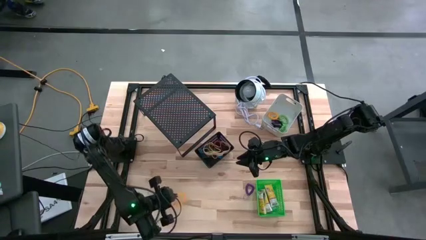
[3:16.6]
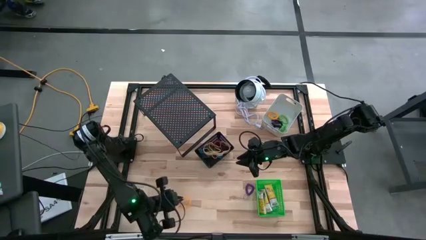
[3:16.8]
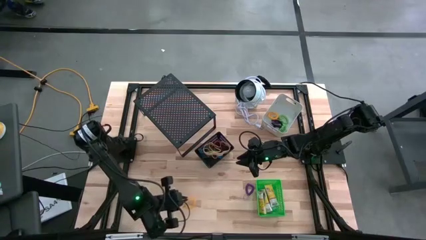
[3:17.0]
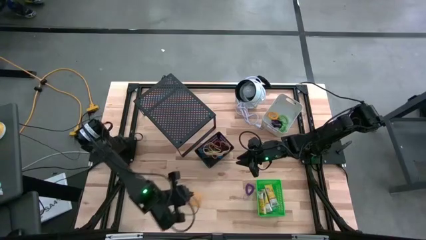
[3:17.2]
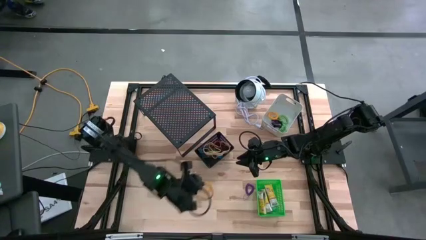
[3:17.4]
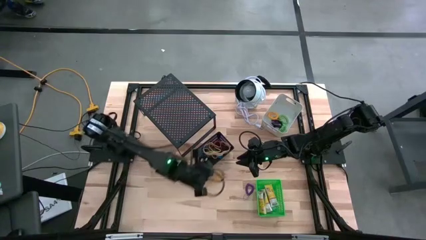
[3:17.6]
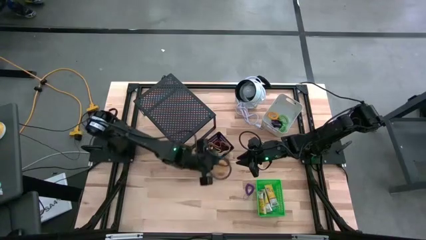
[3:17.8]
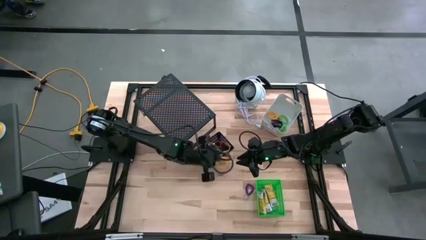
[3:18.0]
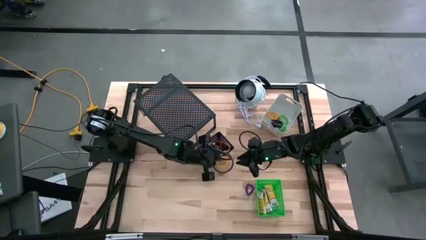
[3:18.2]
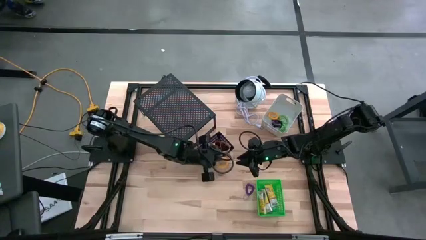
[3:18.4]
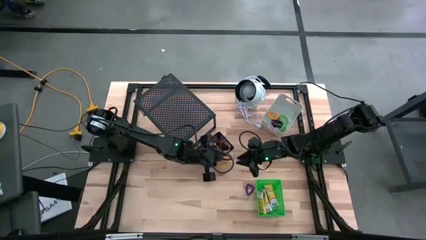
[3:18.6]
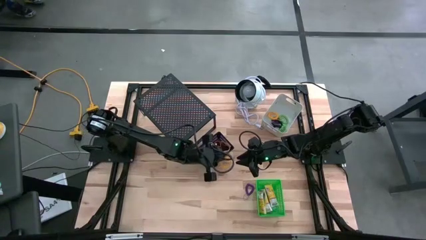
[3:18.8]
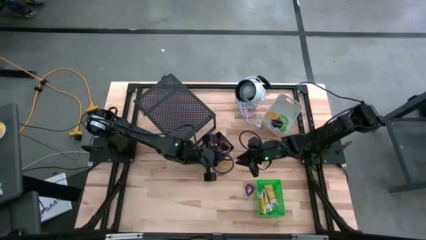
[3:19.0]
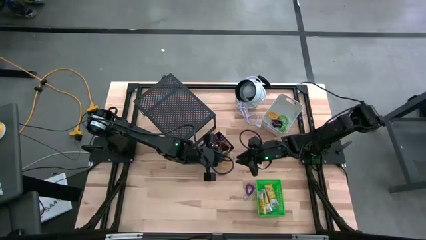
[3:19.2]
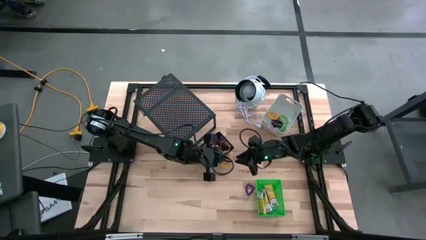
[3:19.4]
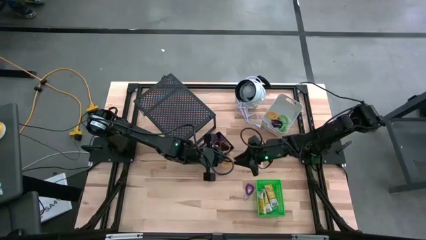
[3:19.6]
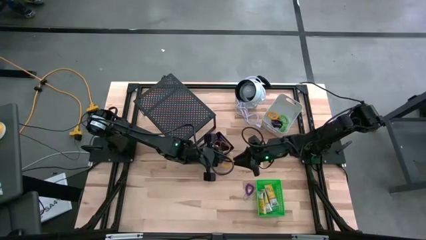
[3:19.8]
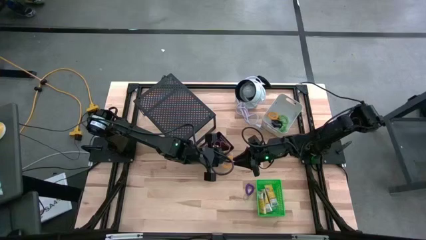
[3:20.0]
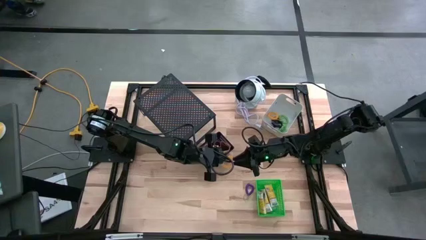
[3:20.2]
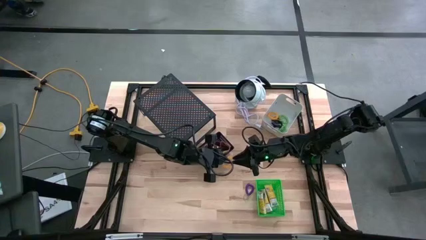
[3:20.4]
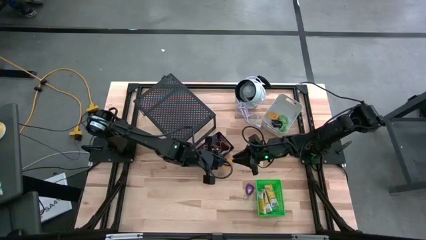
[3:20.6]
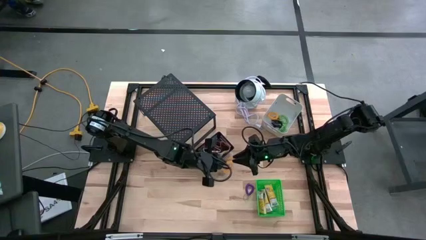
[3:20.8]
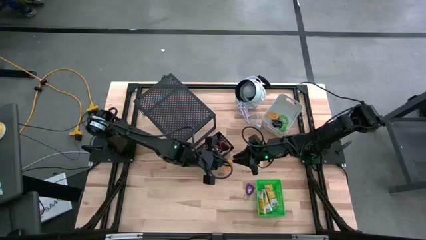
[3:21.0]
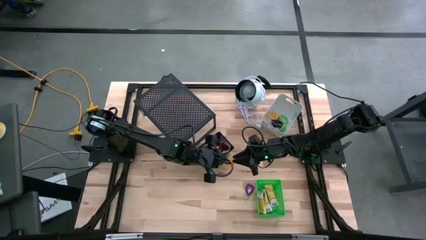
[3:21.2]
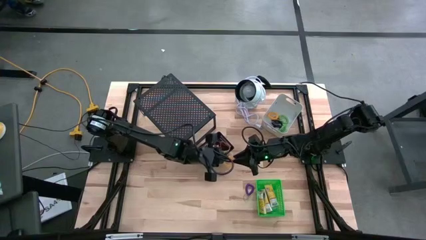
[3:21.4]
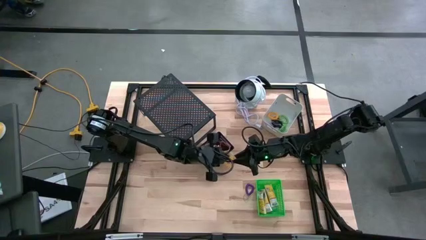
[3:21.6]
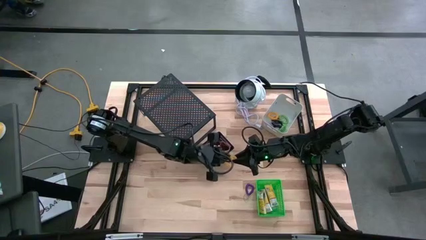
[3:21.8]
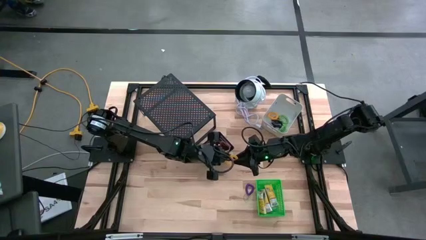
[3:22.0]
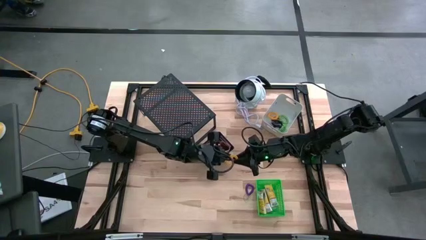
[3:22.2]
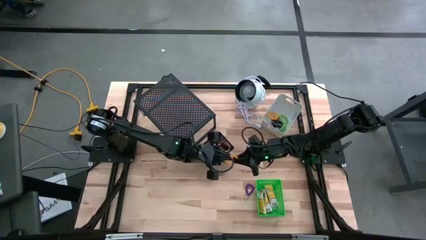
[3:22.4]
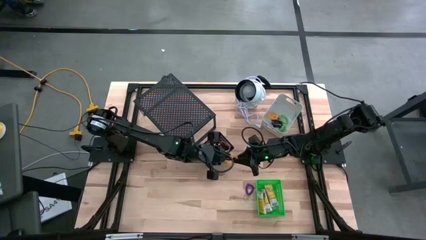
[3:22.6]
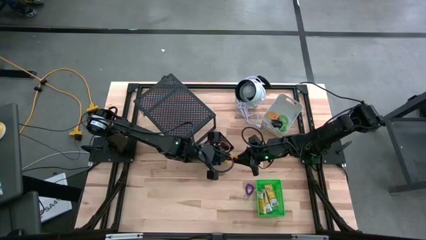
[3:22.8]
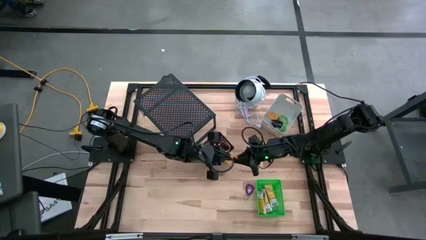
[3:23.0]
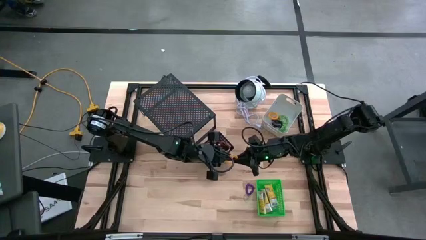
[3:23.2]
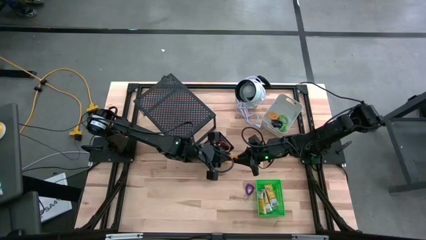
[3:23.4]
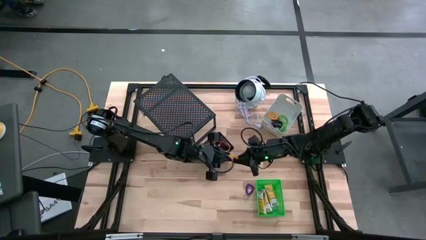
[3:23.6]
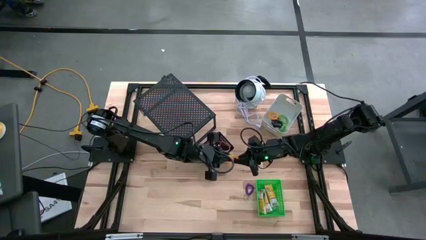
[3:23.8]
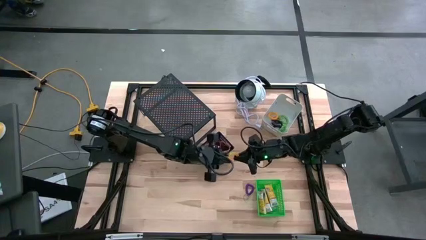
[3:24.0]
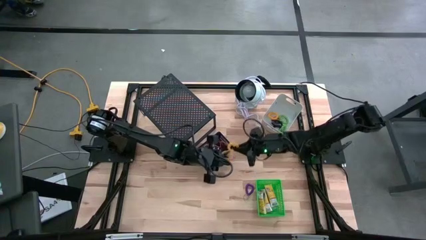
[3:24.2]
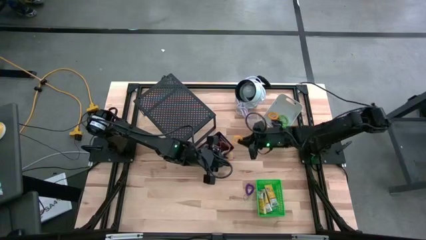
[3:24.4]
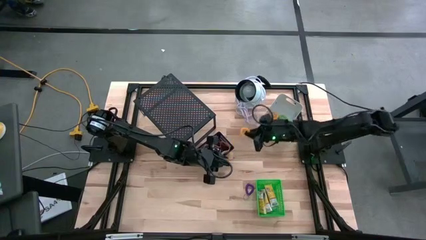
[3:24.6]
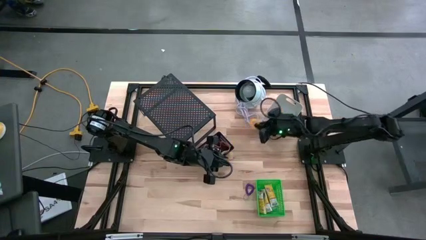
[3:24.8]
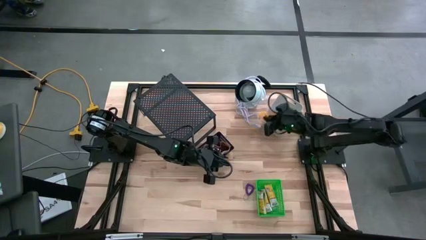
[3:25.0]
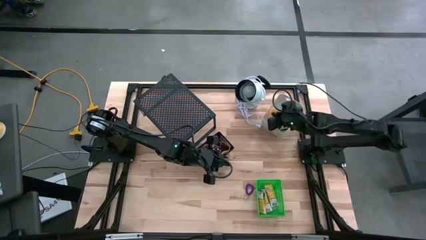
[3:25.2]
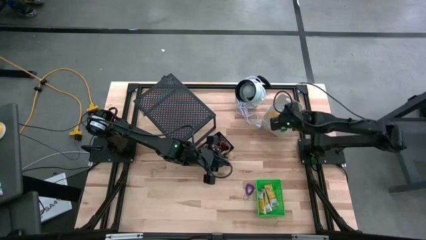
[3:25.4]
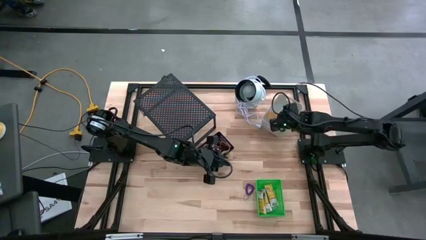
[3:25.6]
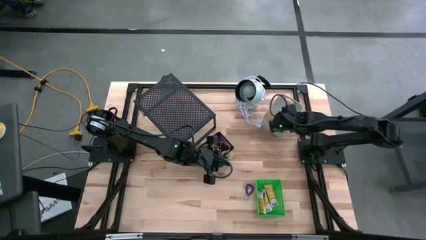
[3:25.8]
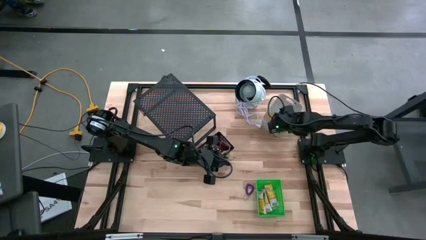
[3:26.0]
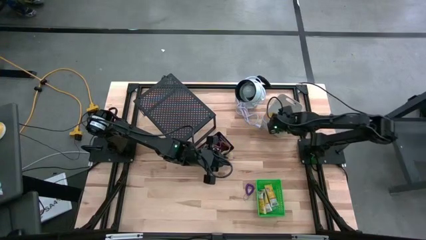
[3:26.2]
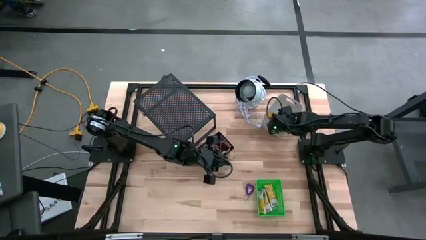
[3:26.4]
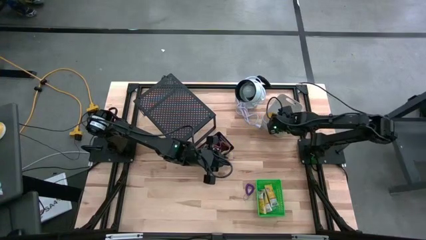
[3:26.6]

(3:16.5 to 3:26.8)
Task: Pick & Place Office Desk Supplies
Put the orange spring keychain into the white bin

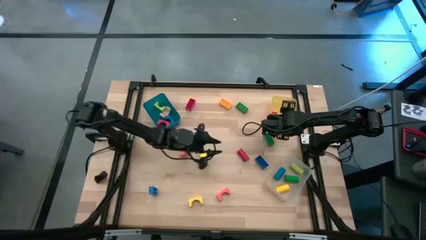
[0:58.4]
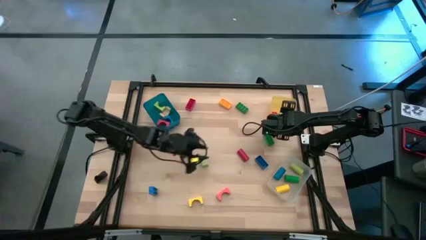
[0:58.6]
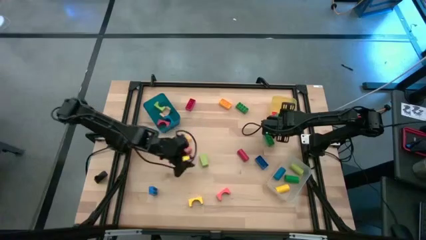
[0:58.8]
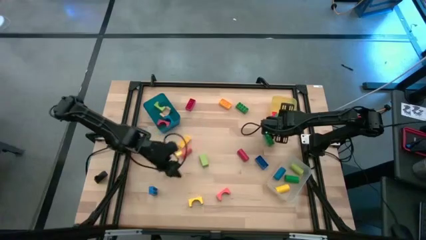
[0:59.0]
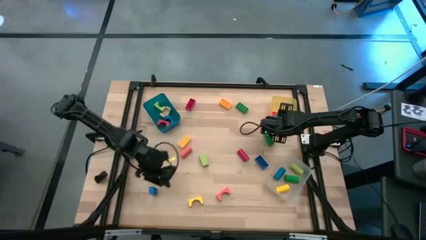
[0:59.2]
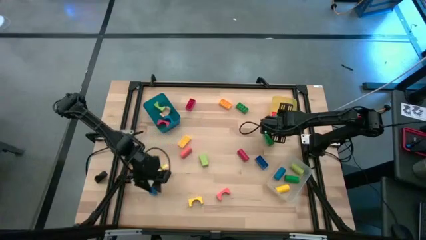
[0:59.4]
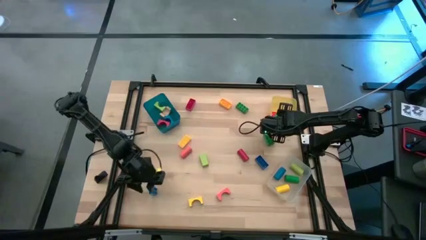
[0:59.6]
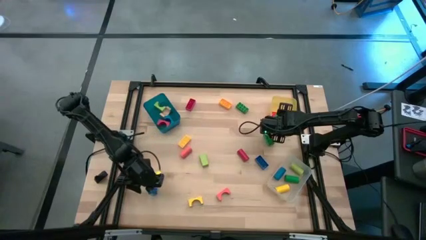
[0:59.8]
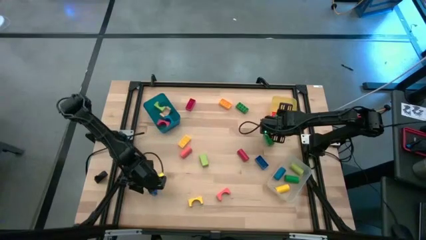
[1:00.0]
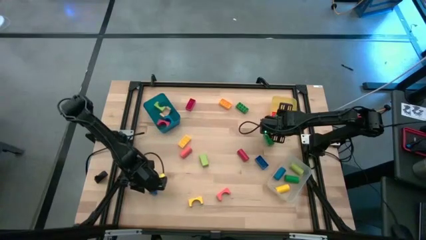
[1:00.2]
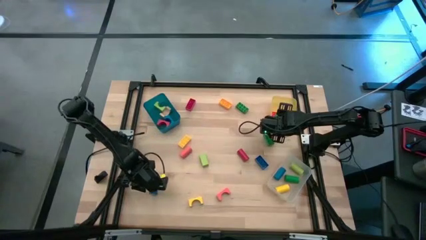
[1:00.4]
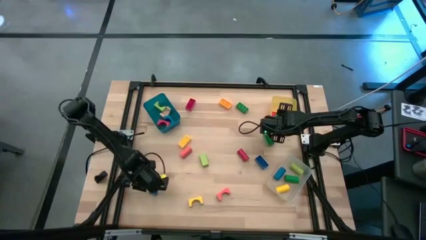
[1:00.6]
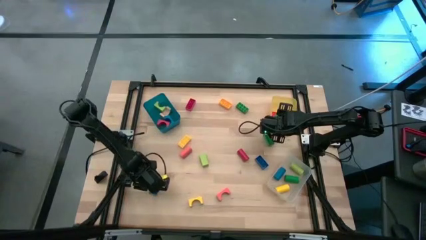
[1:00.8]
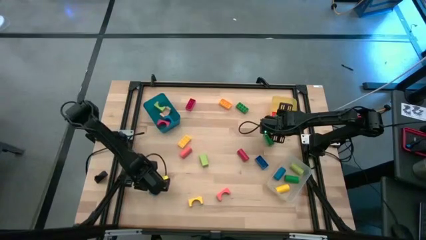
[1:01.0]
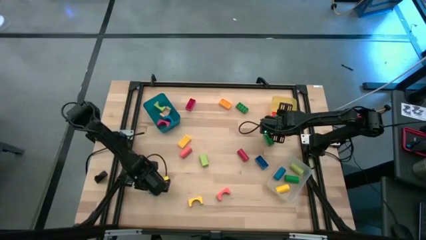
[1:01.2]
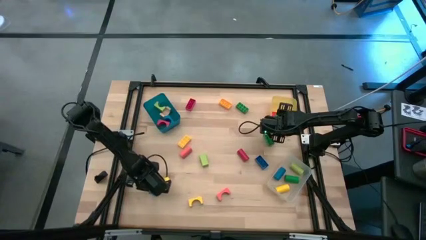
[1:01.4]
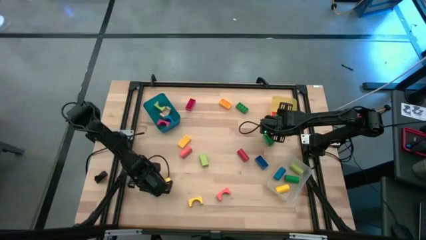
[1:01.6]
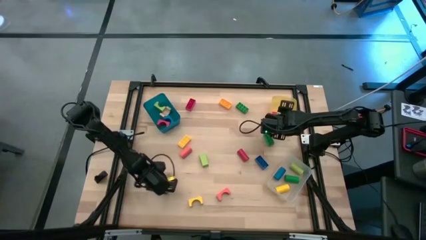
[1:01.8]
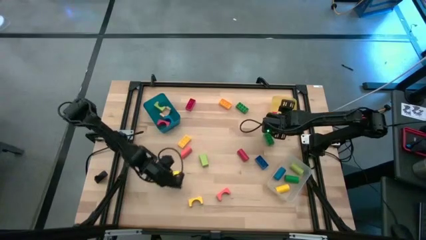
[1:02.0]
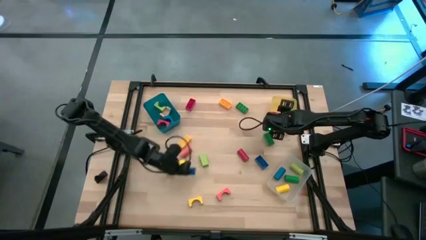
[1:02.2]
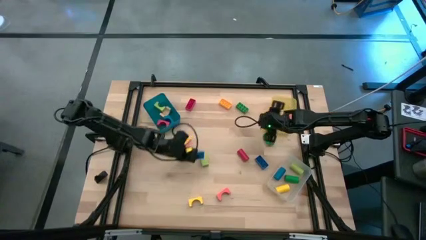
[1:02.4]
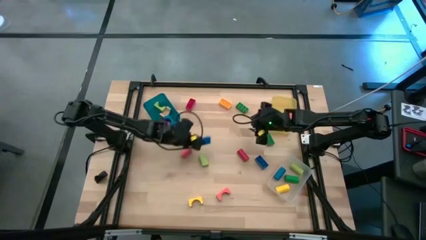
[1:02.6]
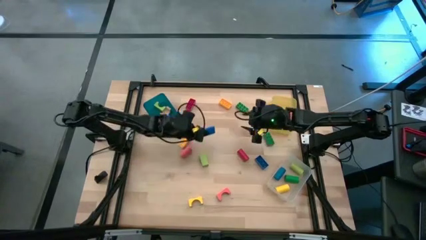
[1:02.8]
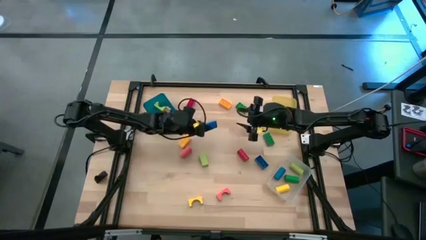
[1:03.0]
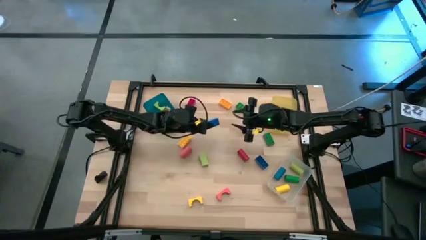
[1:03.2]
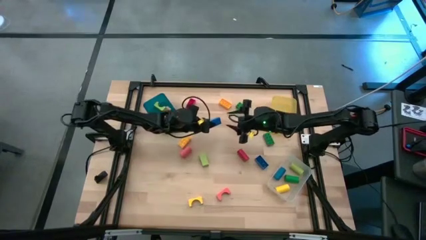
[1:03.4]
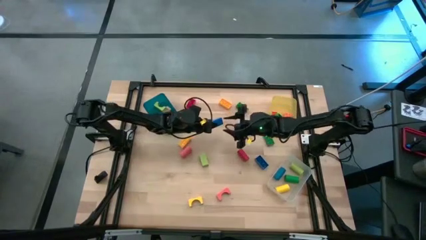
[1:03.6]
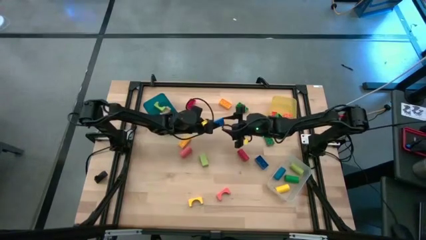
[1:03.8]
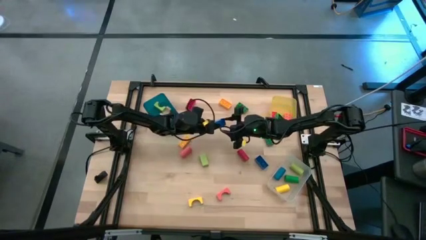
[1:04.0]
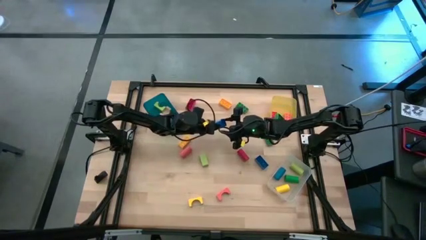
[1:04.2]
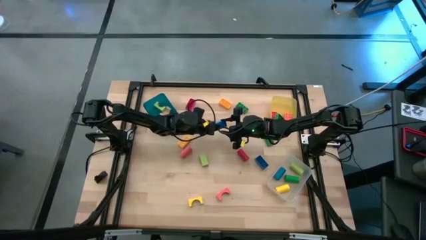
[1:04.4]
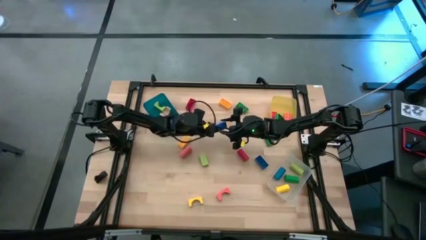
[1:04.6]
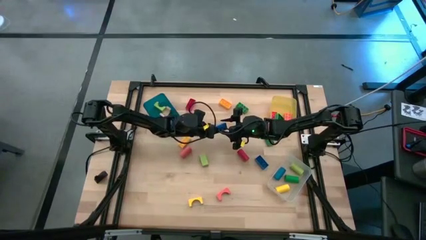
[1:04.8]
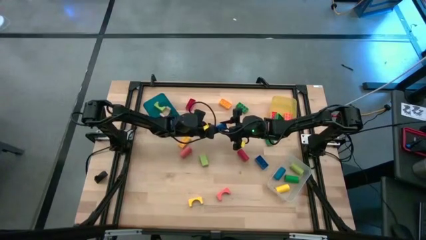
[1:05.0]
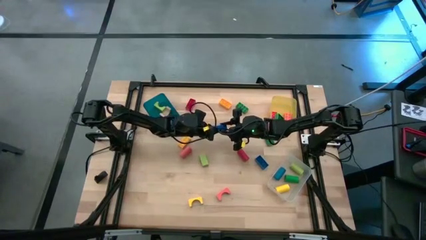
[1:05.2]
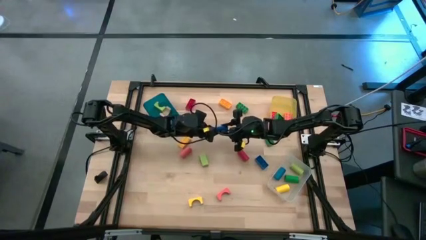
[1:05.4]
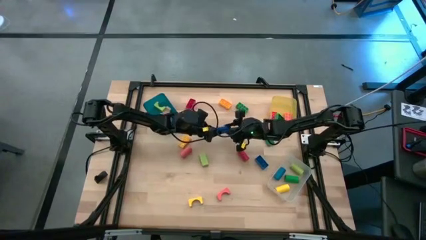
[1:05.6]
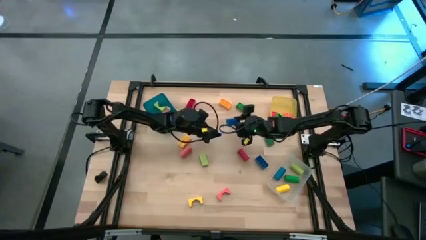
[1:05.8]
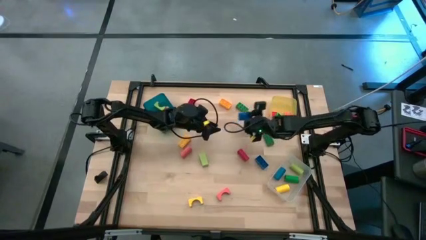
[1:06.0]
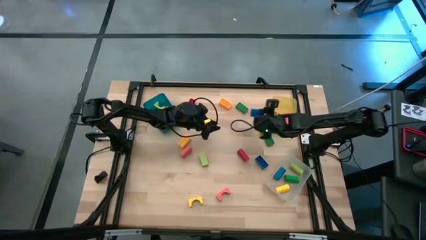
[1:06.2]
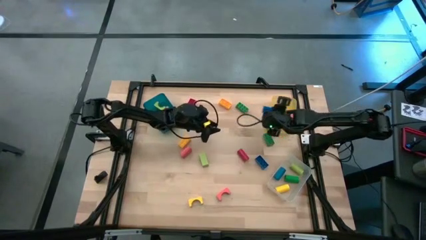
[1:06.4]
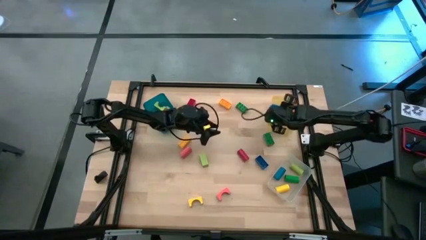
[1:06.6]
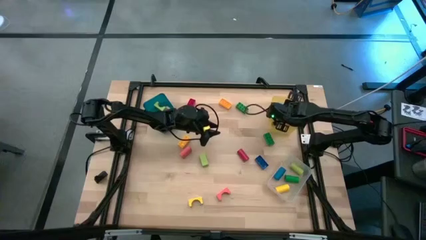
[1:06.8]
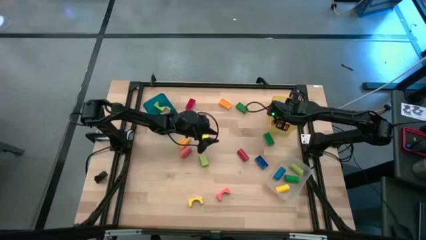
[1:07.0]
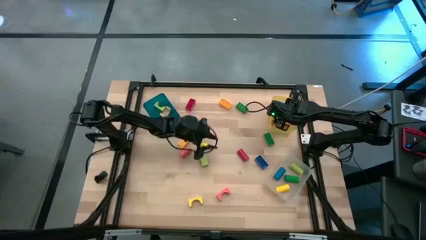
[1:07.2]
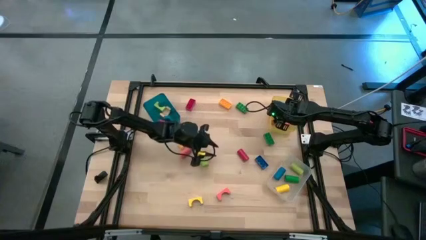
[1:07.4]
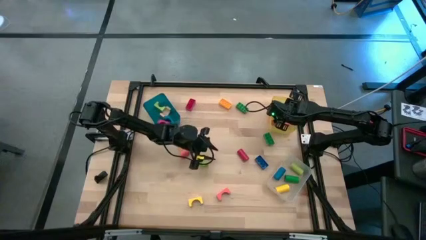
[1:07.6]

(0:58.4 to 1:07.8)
Task: Sort blocks by size
Put the blue game piece into the yellow bin
